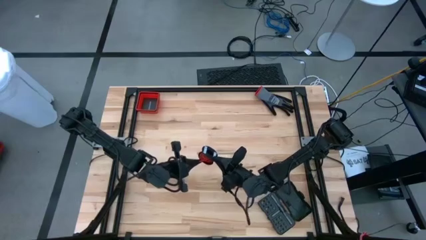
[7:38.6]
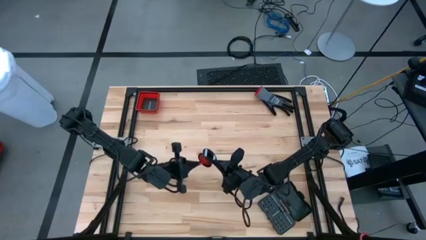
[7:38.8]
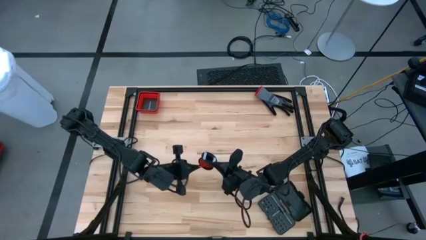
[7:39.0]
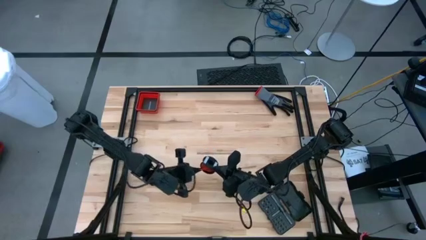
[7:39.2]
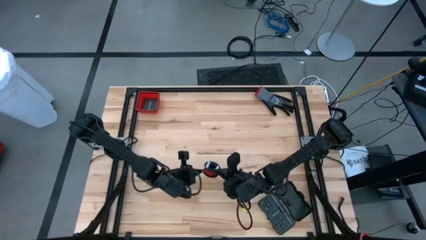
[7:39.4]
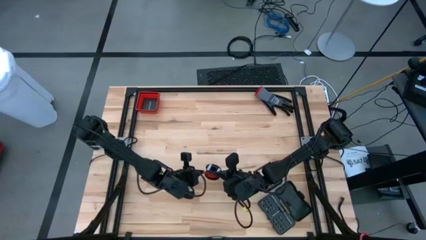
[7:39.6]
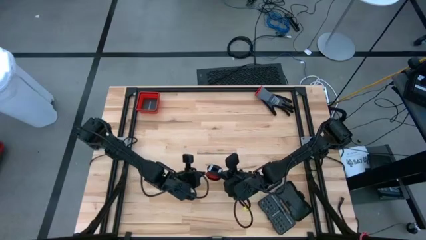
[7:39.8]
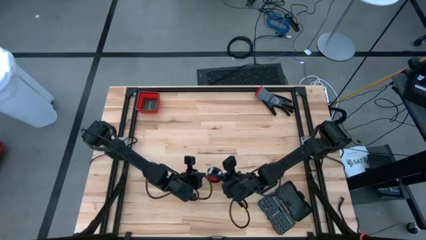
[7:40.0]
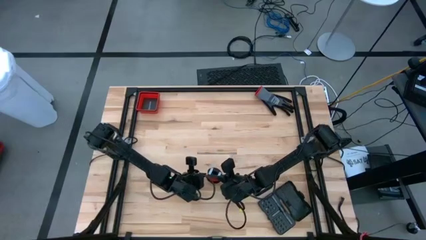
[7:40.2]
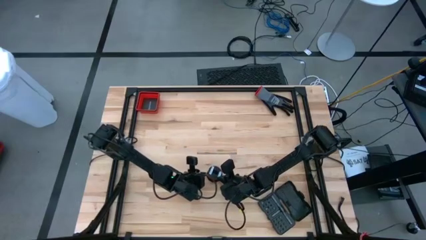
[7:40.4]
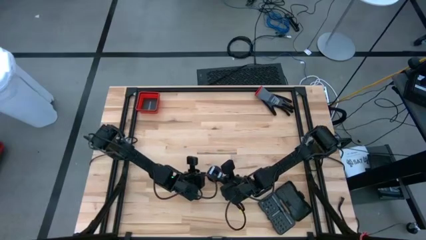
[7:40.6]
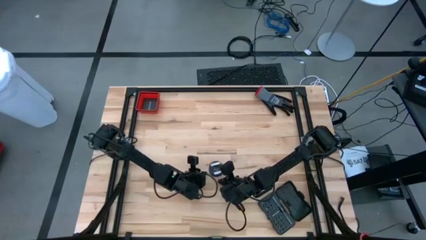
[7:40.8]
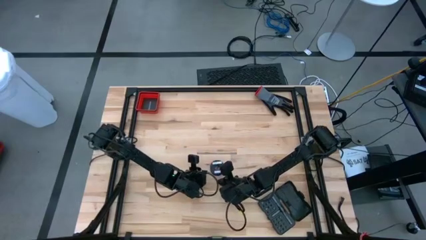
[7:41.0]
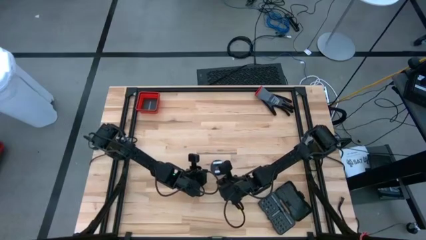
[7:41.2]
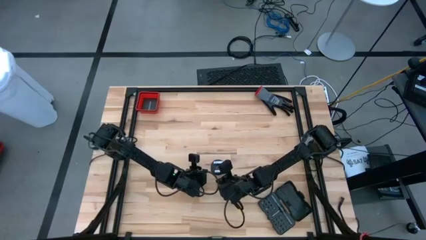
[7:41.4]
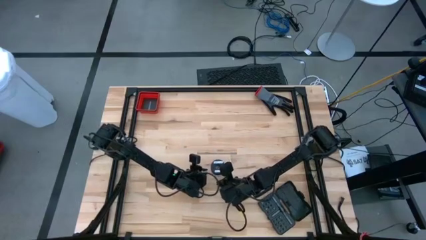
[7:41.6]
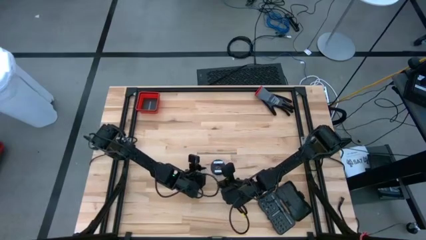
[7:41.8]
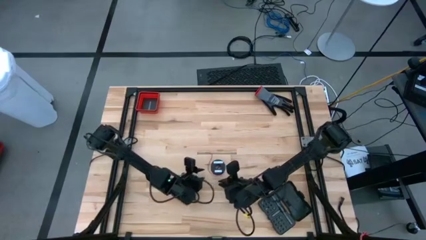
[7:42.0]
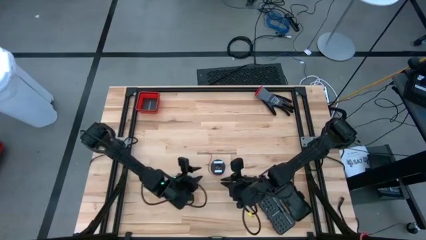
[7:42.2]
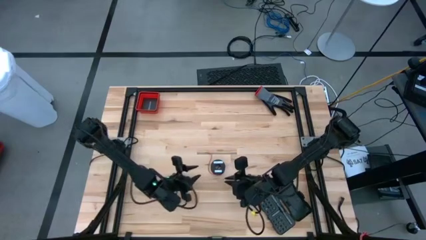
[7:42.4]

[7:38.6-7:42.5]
Task: Coil cords
Put the coiled red wire on the table

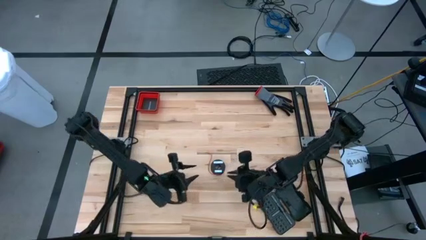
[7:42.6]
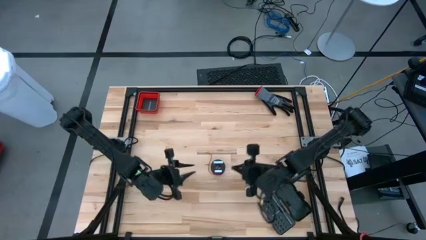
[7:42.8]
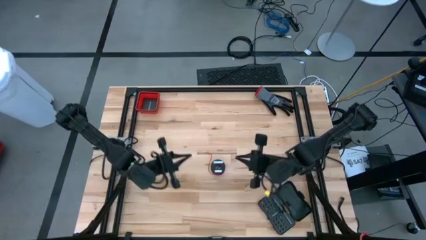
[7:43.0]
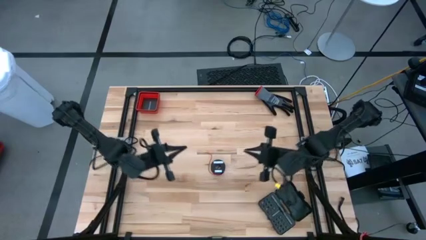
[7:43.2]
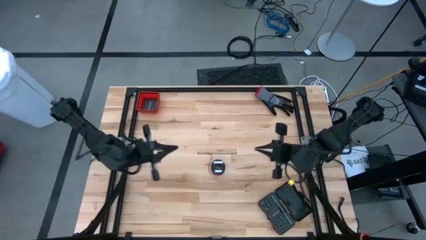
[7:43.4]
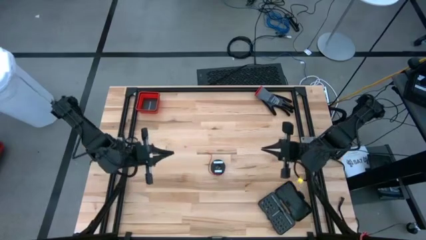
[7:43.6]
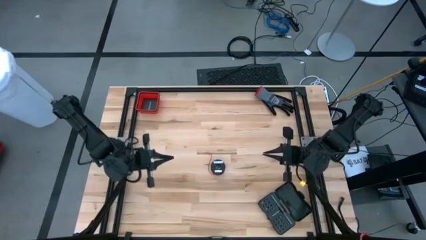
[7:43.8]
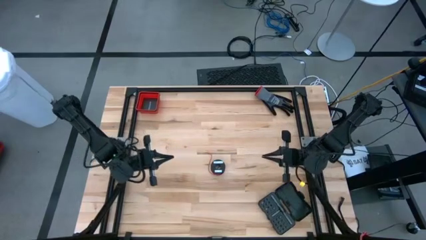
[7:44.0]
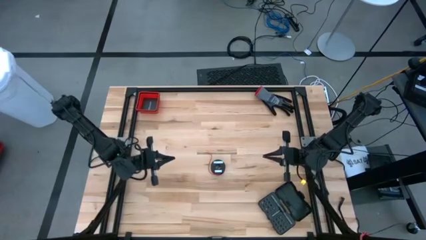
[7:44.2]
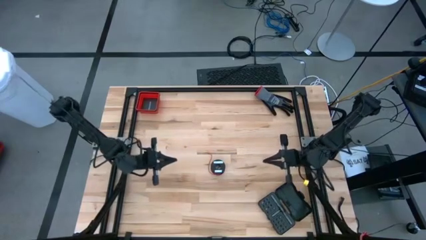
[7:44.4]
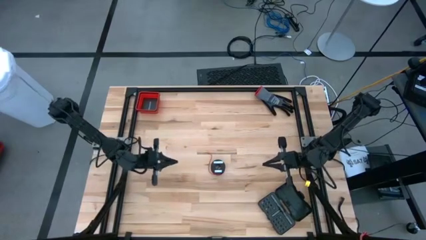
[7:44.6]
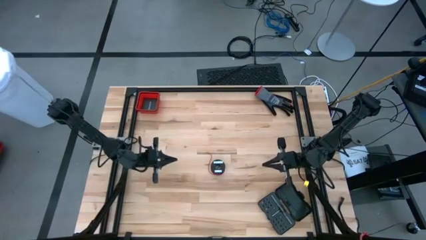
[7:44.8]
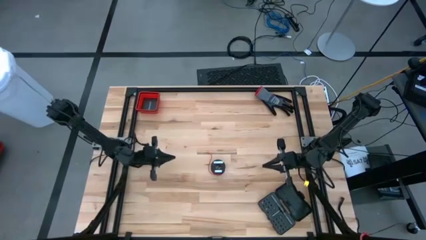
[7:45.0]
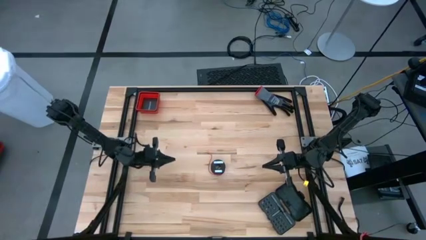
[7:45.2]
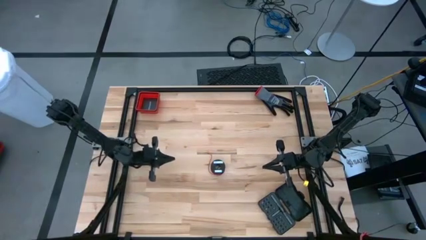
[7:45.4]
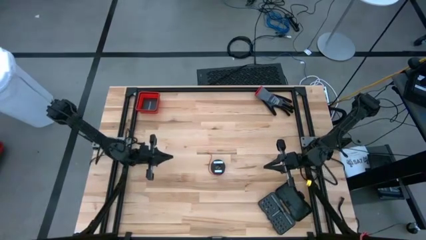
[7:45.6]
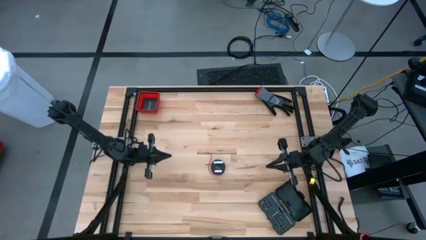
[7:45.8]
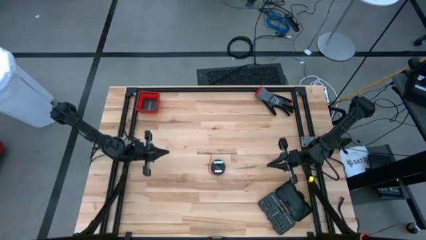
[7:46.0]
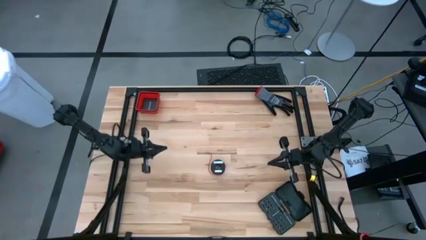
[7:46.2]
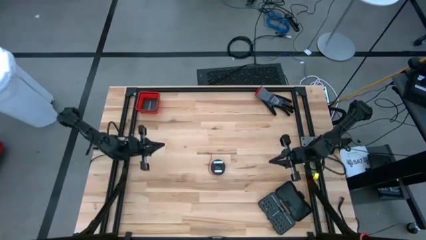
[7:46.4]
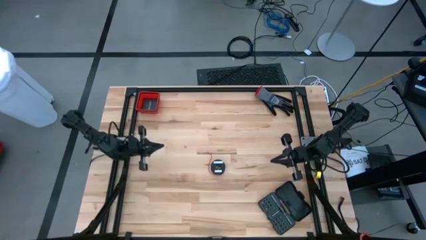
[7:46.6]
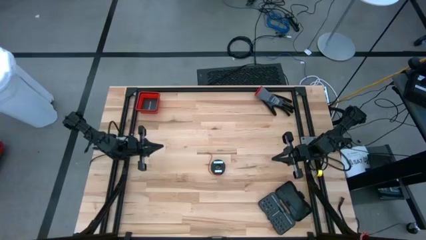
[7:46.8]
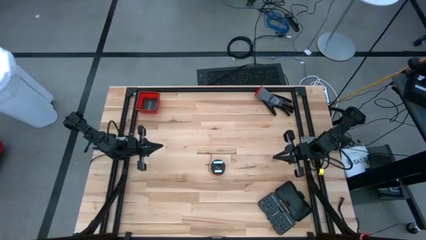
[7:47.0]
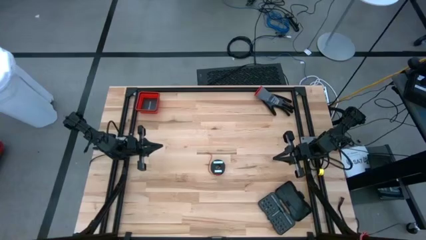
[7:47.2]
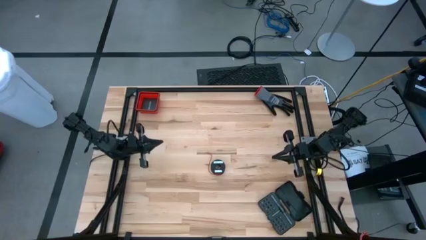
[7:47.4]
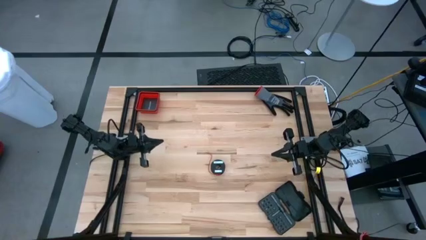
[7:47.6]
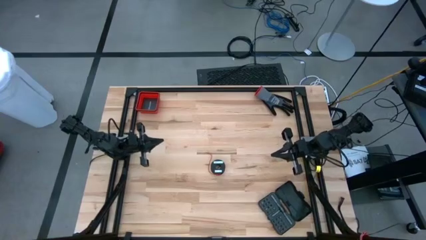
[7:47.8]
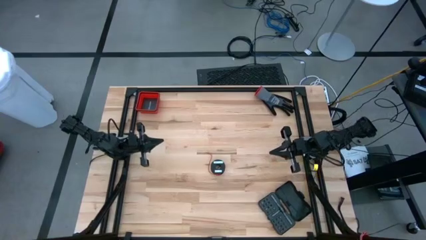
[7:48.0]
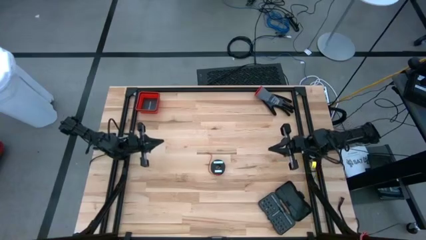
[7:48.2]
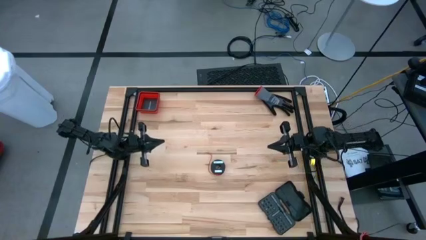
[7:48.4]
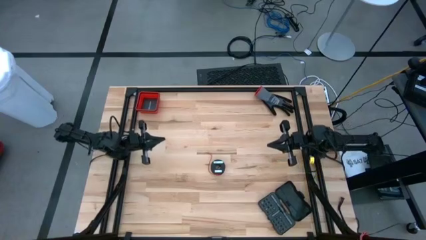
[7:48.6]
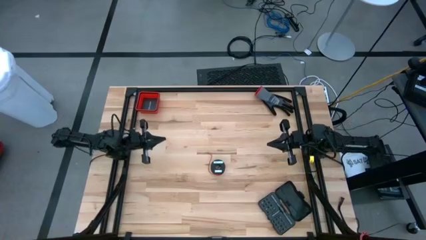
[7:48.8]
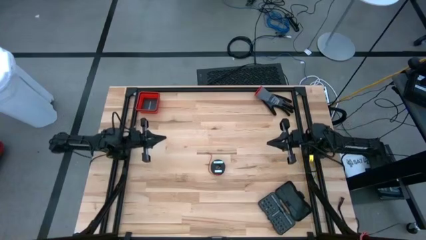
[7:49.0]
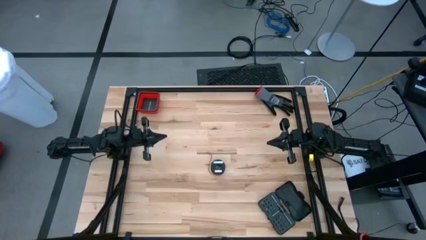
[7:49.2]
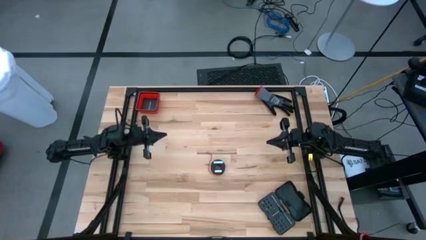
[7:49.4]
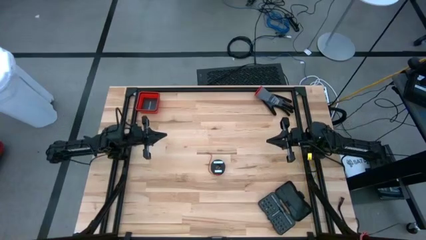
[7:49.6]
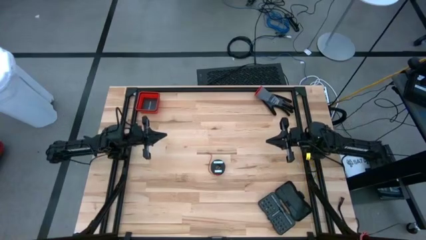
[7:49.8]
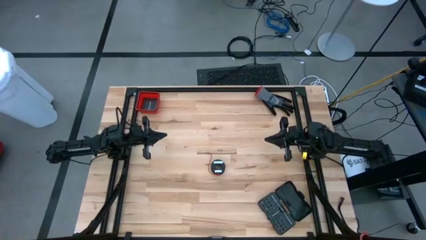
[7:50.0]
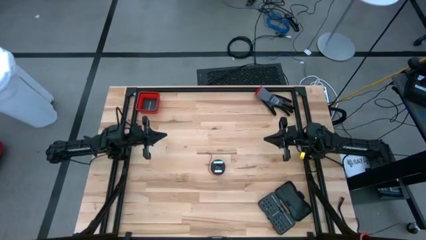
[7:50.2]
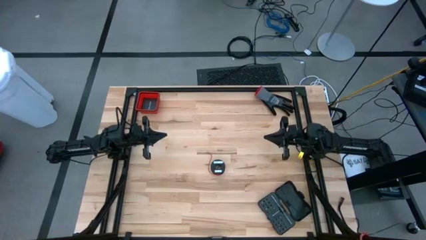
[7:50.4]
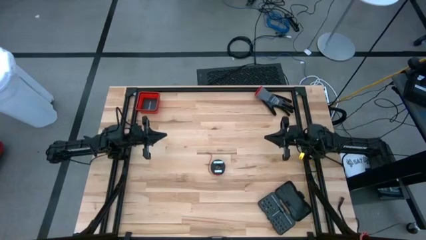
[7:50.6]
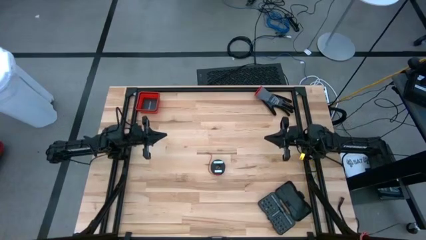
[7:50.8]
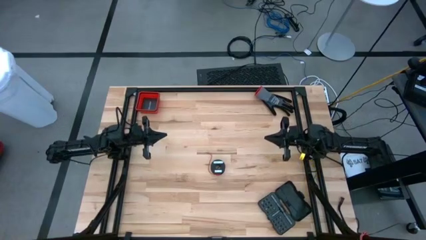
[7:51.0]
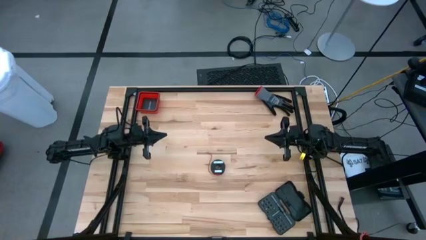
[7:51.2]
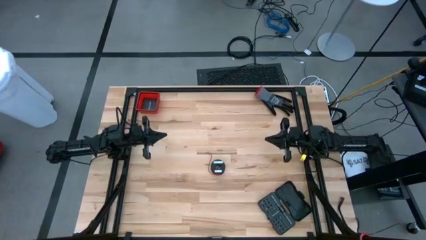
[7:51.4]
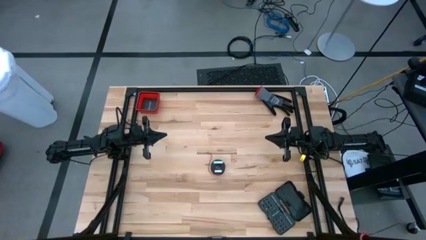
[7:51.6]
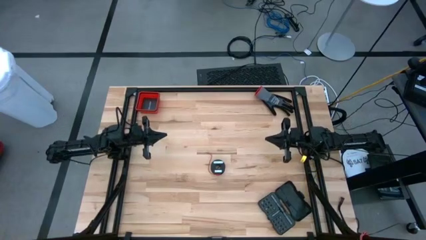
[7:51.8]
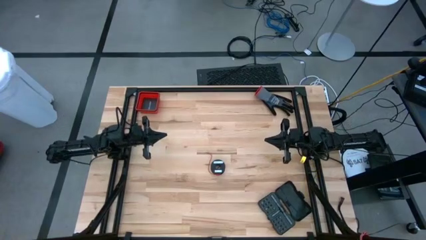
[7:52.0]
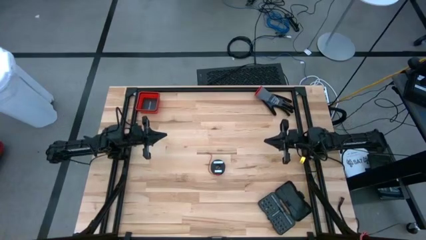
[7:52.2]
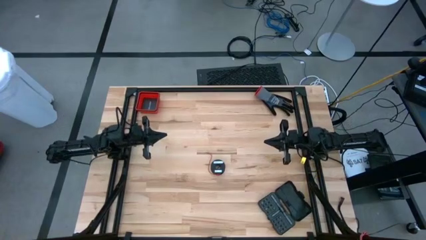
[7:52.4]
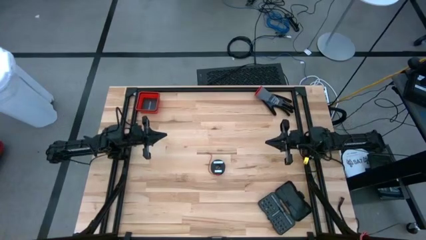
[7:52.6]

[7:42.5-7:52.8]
Return to Home Position
